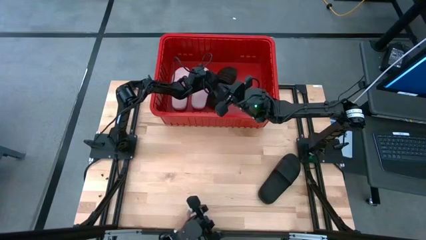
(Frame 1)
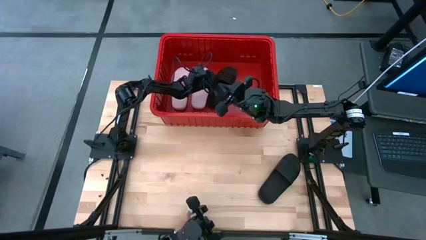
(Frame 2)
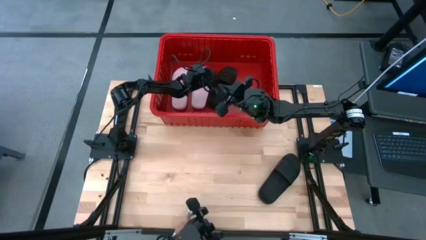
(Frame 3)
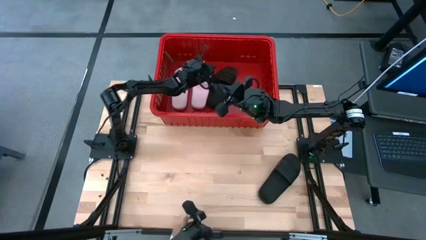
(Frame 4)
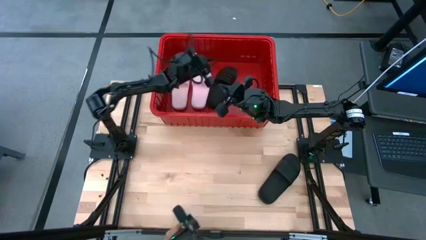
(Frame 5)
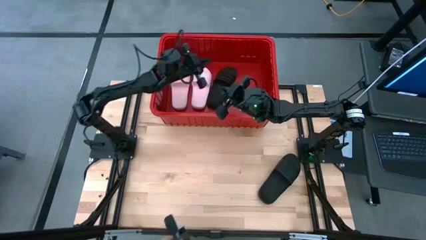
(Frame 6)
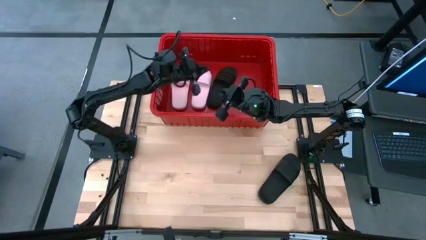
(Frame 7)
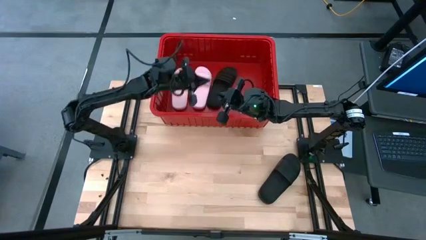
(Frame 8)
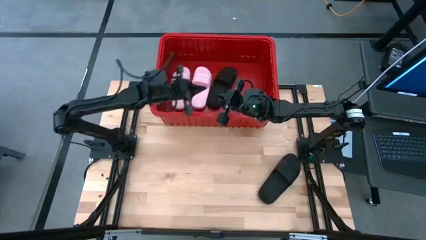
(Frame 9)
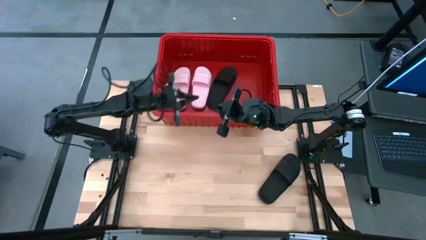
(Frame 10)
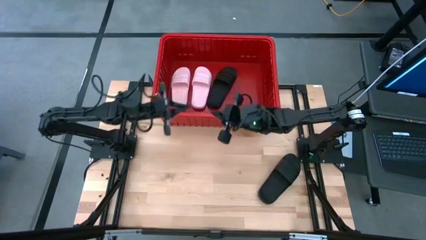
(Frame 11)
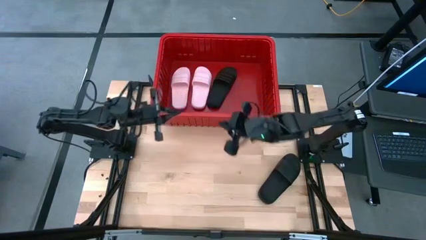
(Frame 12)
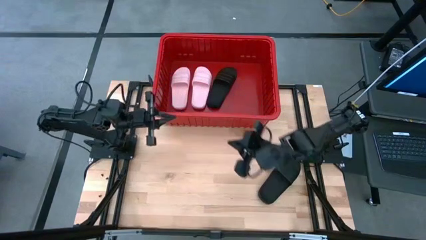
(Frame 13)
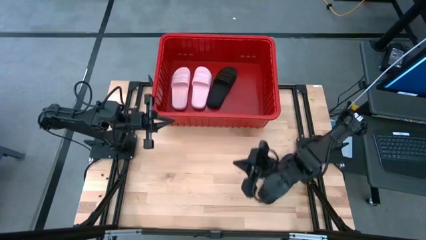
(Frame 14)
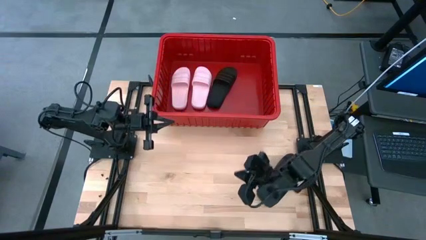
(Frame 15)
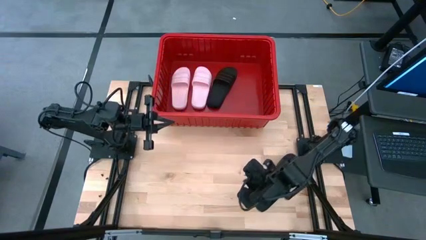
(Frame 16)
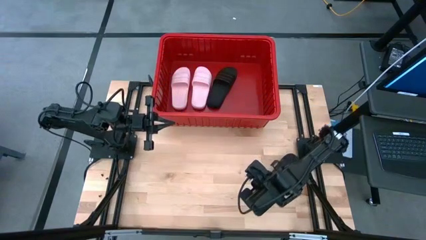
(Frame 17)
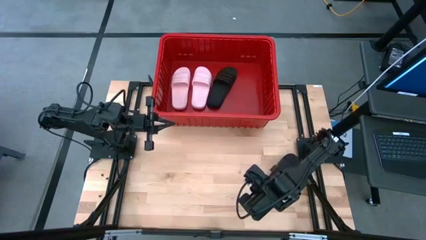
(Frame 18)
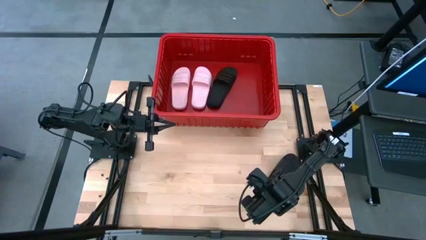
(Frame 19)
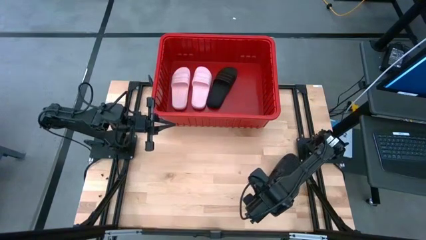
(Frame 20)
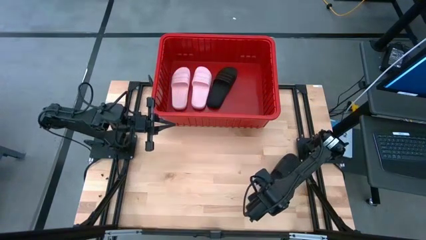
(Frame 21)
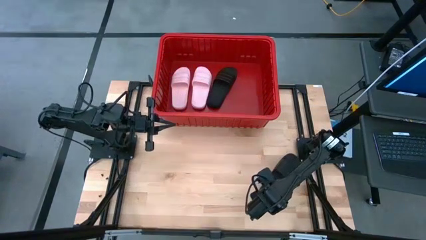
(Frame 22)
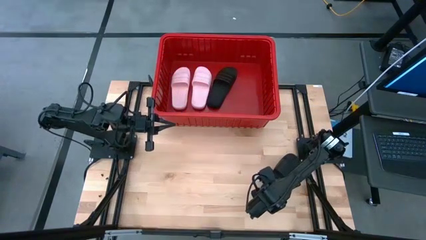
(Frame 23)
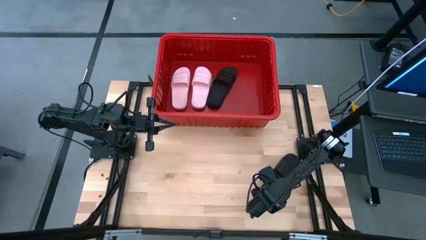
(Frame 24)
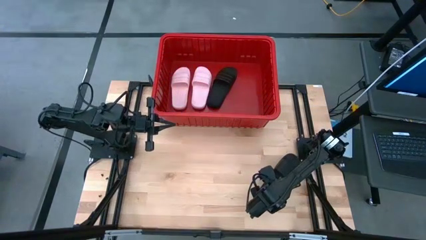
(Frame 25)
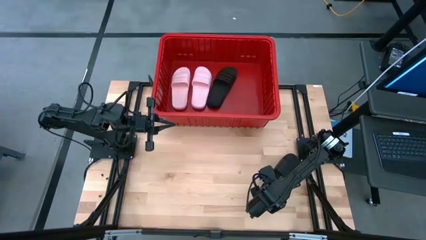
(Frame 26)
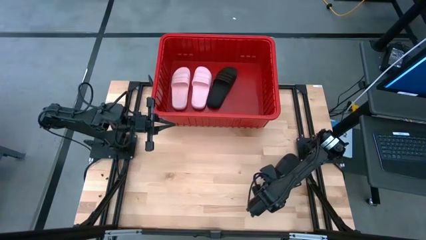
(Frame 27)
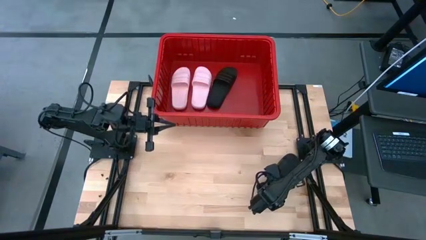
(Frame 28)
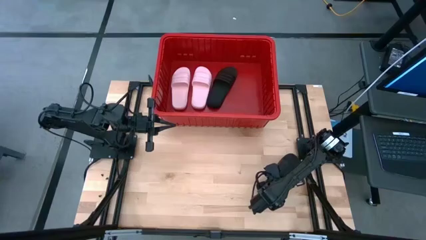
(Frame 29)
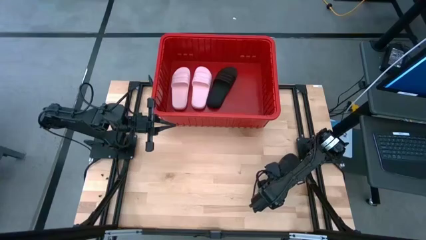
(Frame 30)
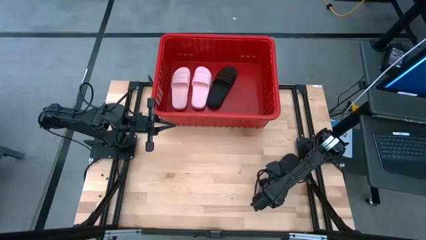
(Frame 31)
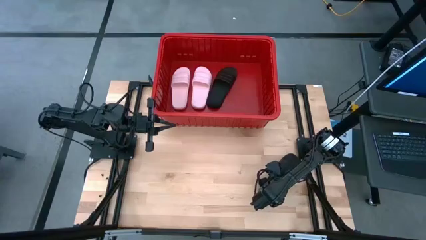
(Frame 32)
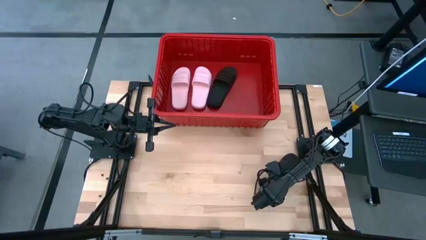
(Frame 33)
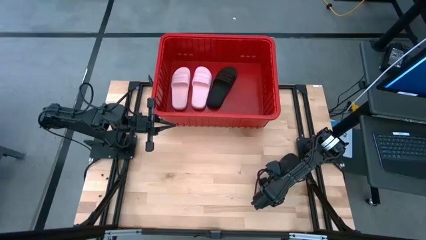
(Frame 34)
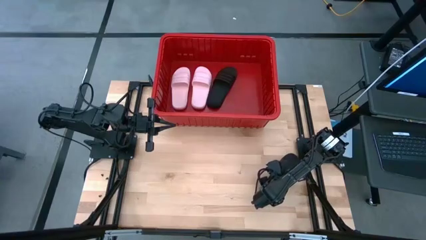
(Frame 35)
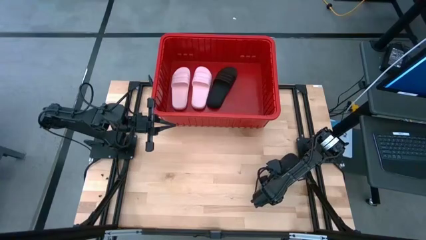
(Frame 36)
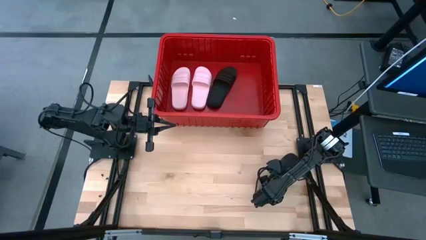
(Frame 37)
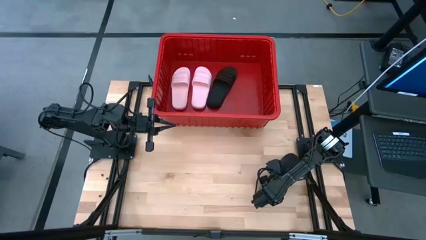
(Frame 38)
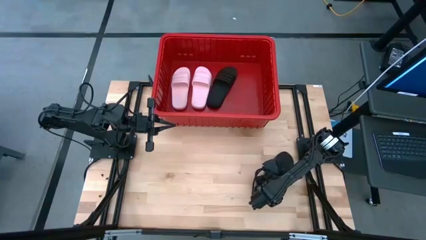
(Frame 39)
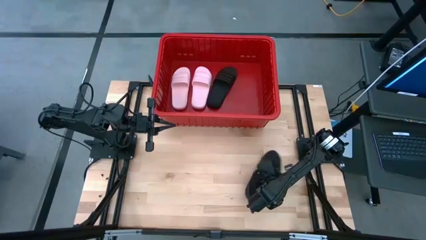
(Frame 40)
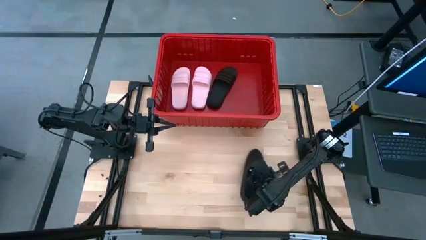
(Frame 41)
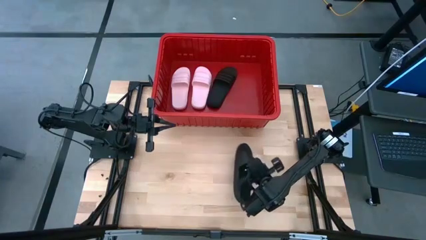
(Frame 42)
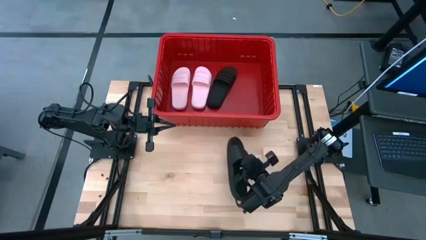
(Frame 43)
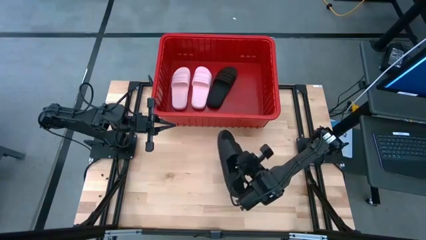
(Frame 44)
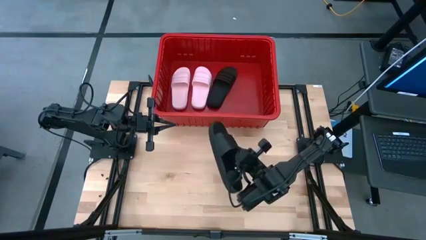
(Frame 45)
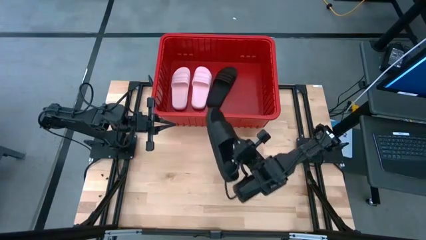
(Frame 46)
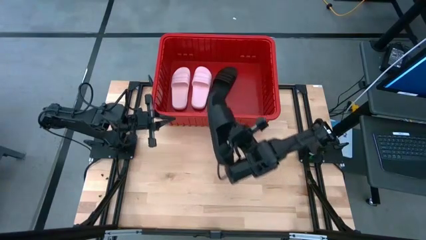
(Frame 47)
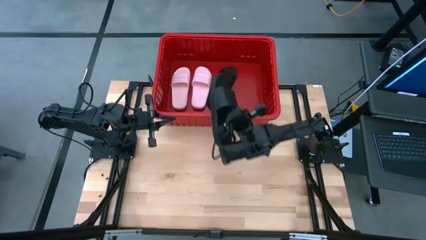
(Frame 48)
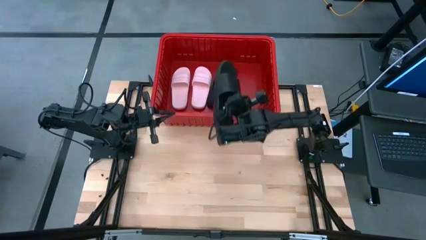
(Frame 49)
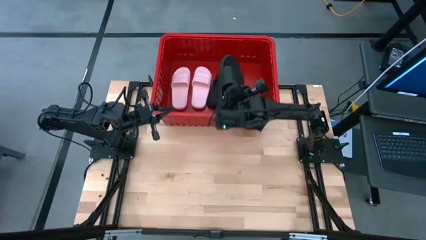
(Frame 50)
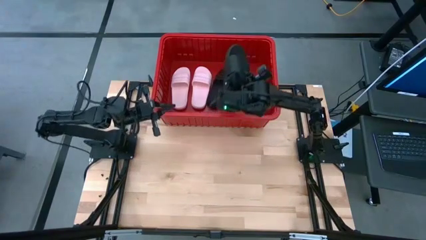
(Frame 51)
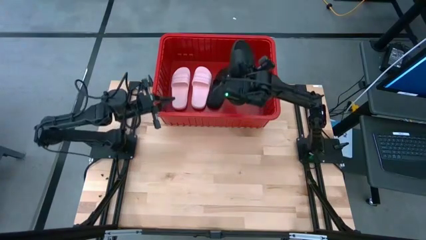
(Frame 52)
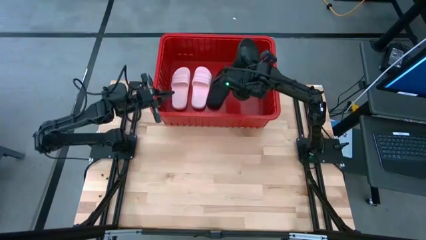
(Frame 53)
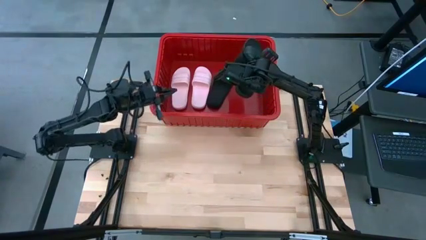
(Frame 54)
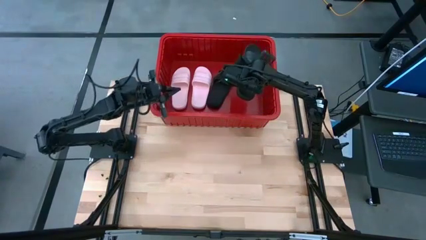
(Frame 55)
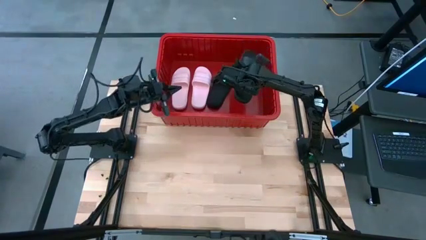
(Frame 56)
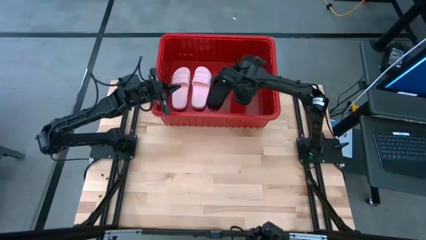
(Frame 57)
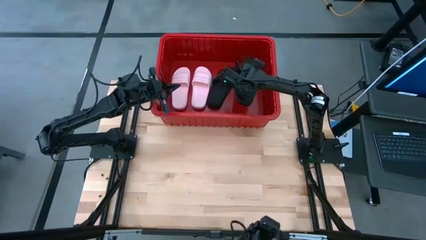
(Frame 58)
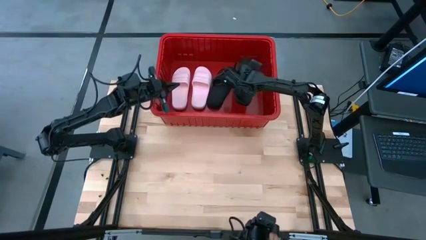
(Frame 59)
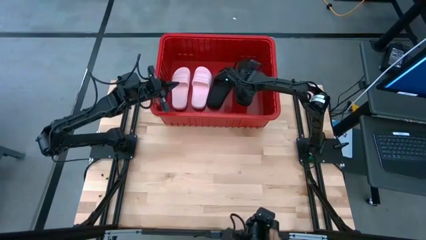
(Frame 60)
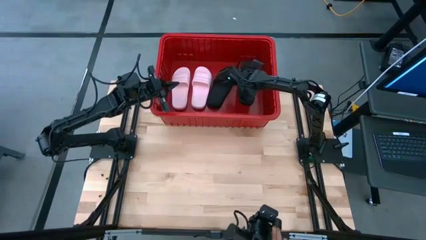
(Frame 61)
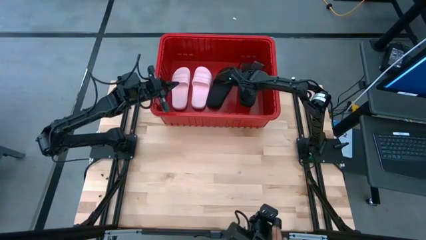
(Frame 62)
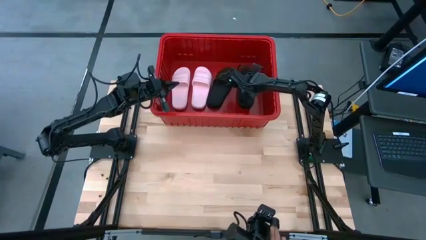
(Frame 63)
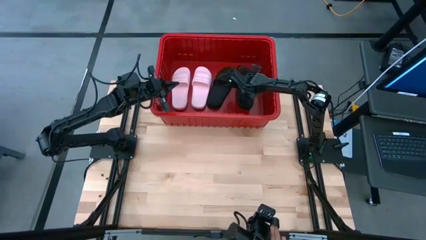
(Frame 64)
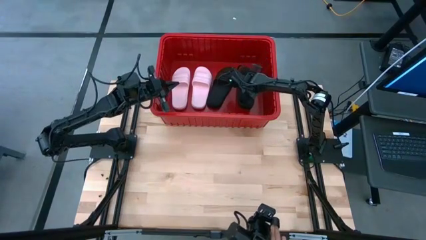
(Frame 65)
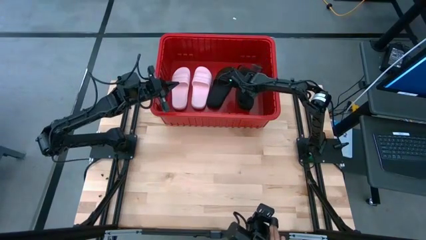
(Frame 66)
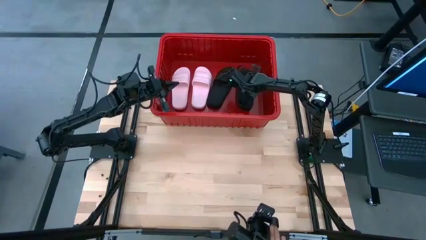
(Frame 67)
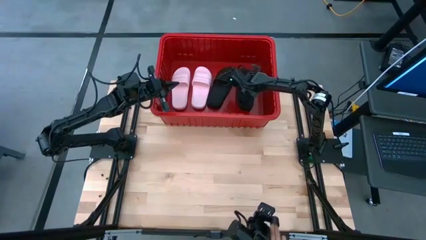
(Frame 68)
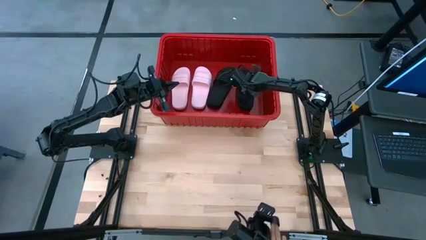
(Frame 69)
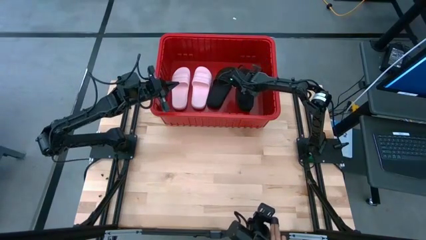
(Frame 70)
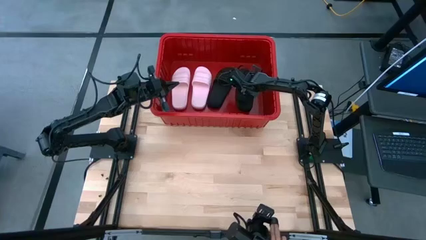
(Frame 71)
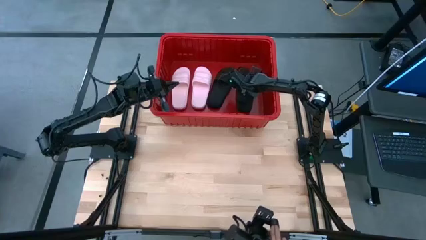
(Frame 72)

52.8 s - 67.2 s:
Task: Pick and place slides into bin
Put the black slide into the red bin
